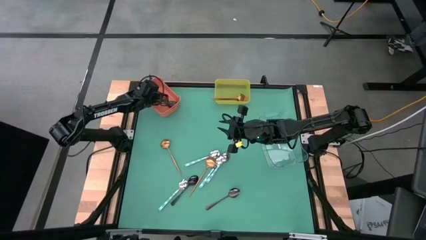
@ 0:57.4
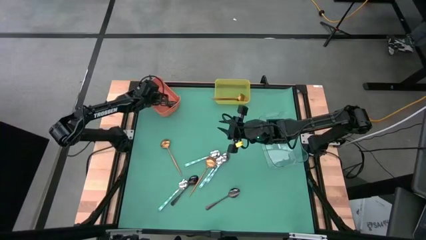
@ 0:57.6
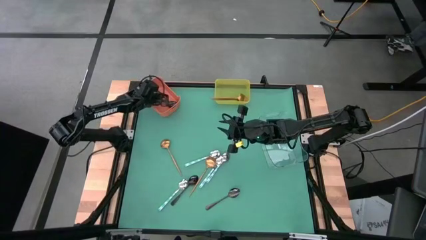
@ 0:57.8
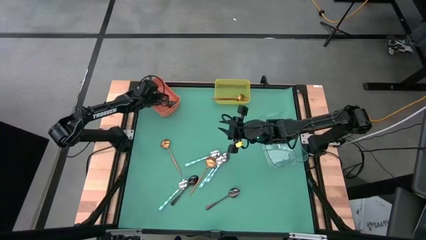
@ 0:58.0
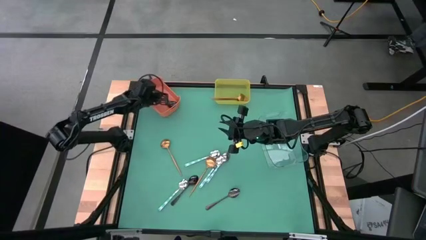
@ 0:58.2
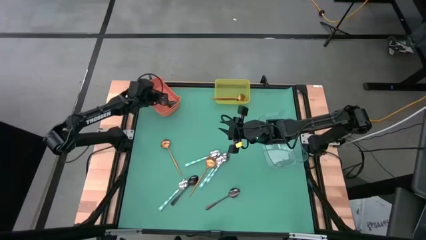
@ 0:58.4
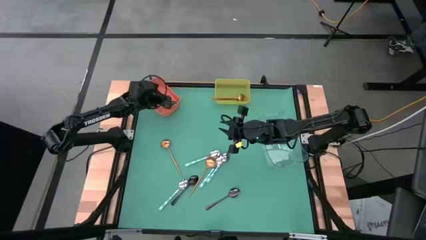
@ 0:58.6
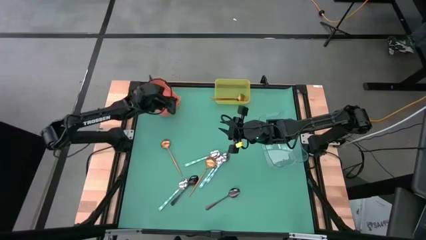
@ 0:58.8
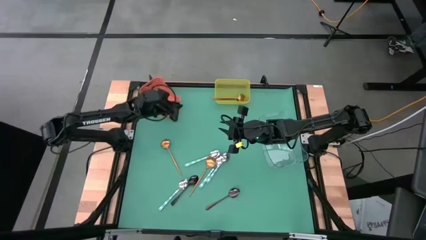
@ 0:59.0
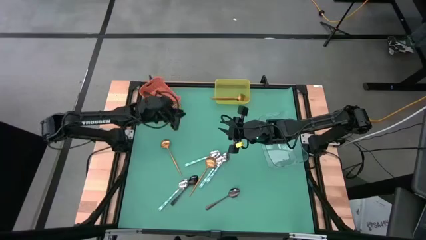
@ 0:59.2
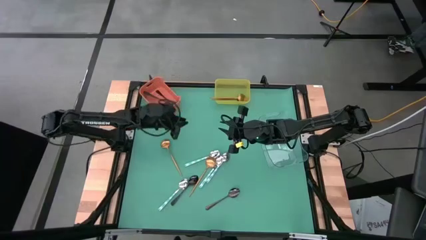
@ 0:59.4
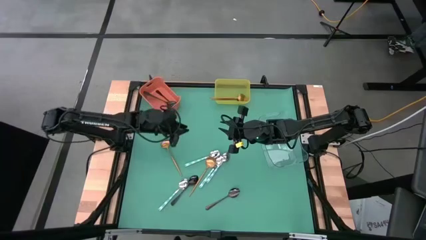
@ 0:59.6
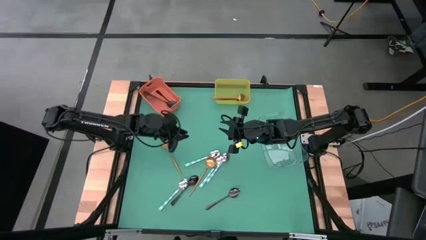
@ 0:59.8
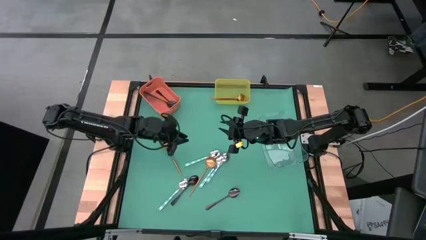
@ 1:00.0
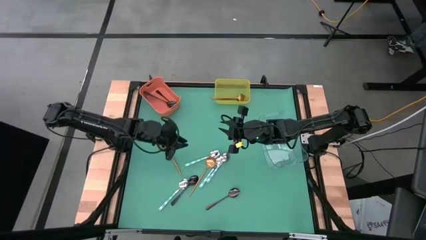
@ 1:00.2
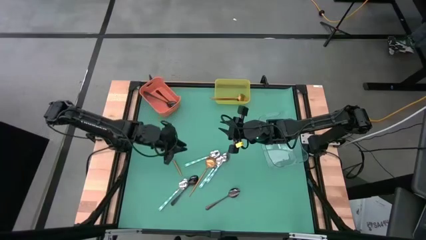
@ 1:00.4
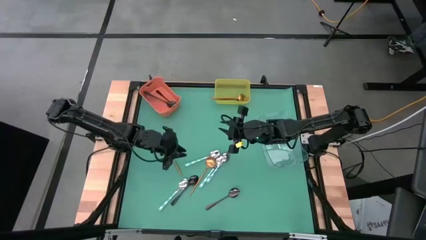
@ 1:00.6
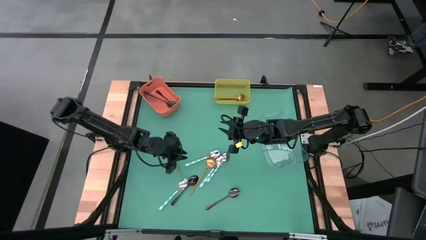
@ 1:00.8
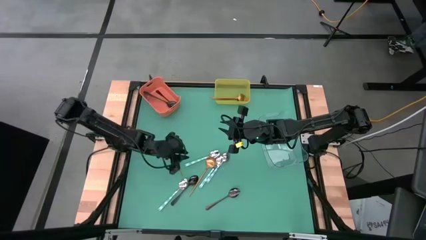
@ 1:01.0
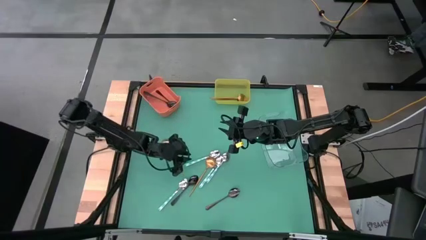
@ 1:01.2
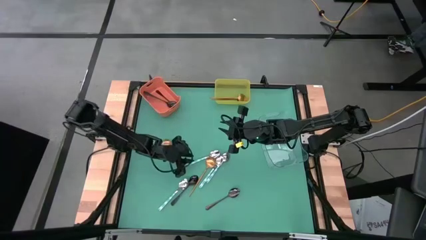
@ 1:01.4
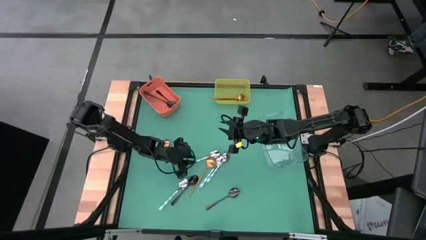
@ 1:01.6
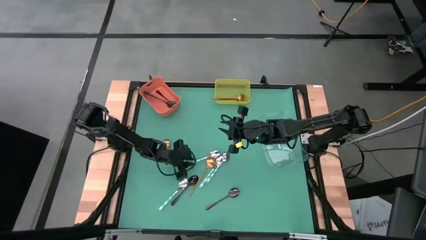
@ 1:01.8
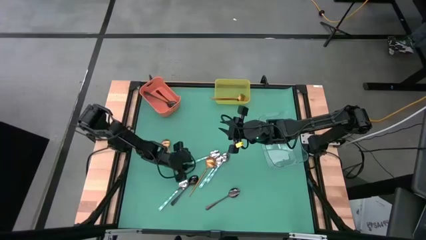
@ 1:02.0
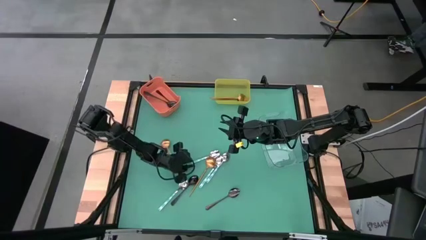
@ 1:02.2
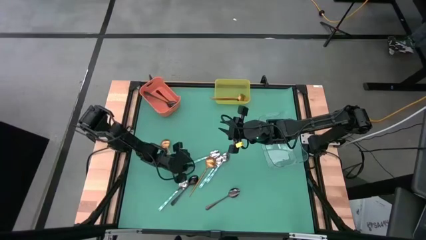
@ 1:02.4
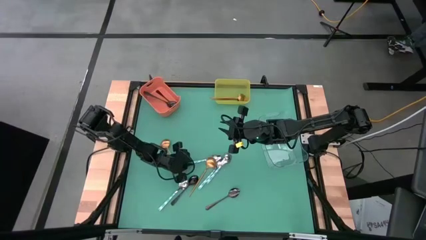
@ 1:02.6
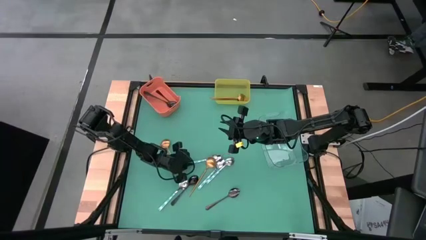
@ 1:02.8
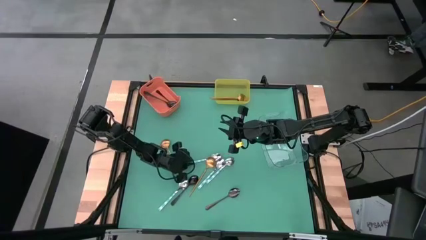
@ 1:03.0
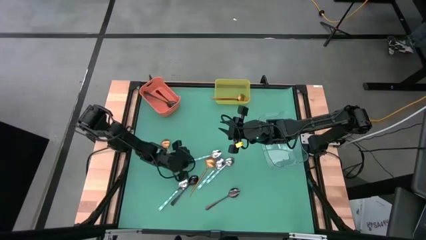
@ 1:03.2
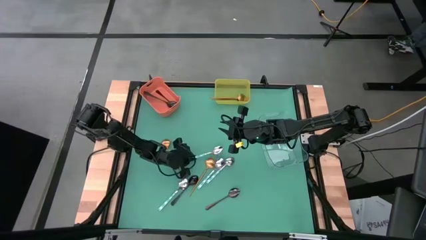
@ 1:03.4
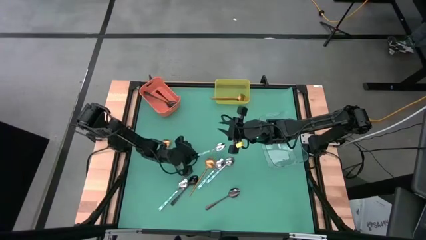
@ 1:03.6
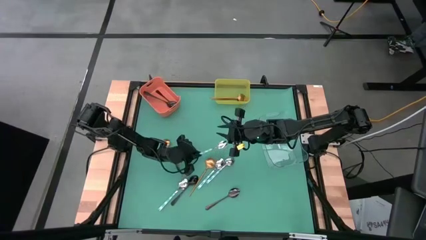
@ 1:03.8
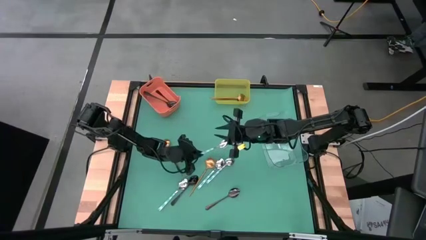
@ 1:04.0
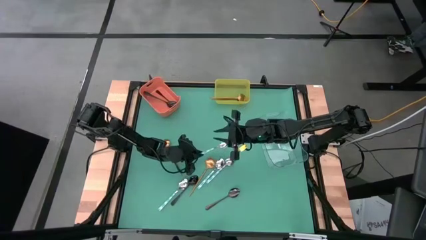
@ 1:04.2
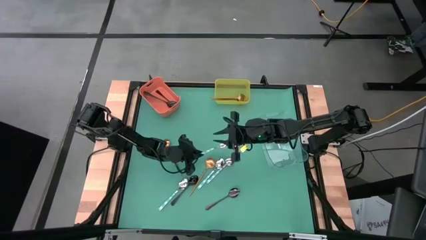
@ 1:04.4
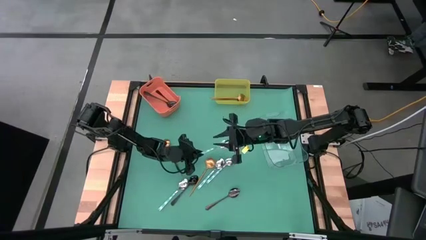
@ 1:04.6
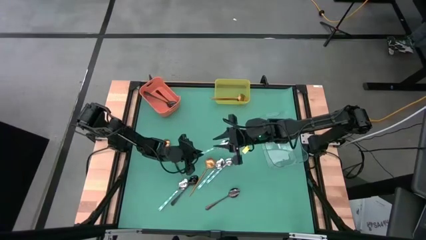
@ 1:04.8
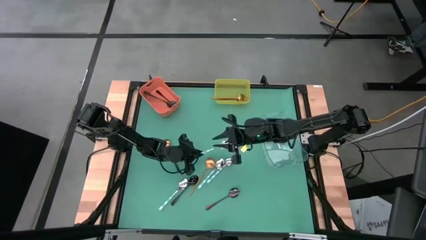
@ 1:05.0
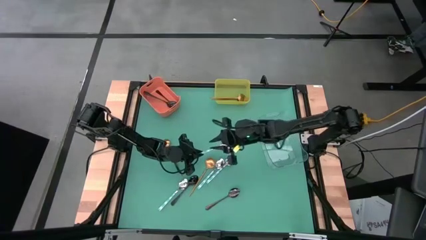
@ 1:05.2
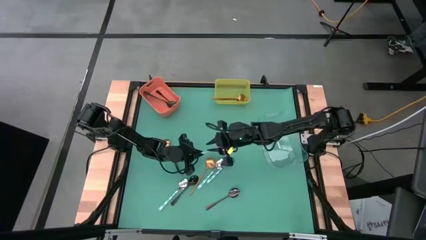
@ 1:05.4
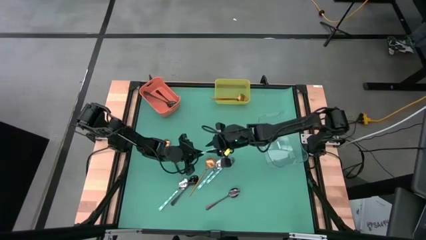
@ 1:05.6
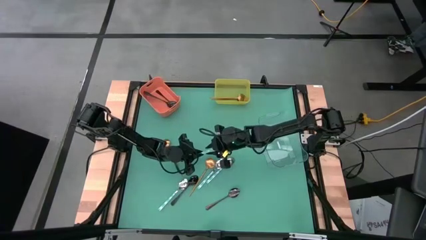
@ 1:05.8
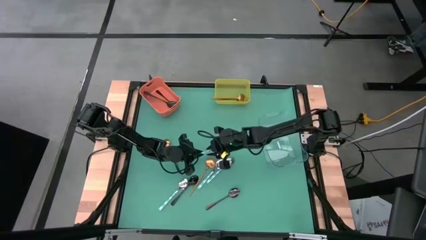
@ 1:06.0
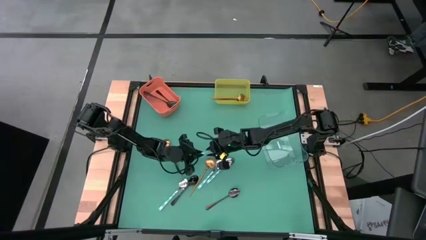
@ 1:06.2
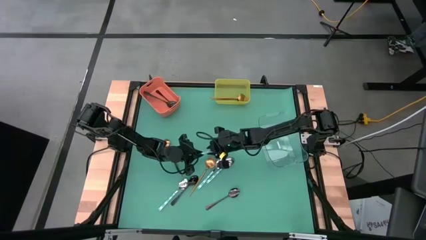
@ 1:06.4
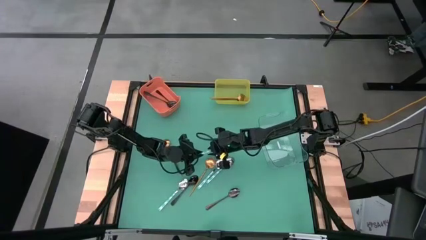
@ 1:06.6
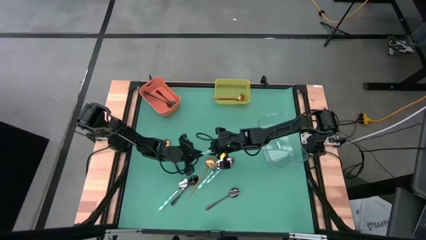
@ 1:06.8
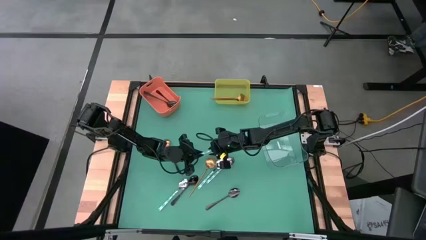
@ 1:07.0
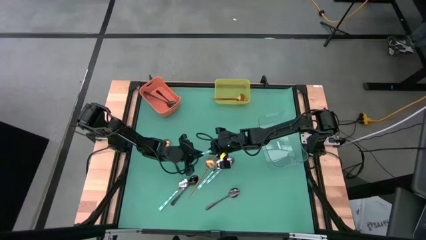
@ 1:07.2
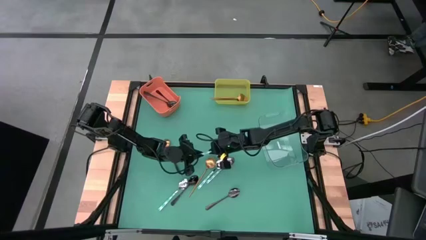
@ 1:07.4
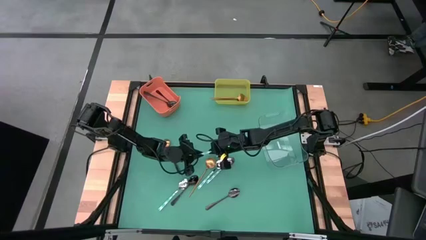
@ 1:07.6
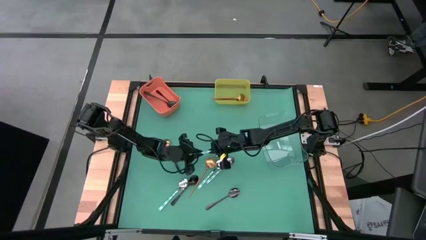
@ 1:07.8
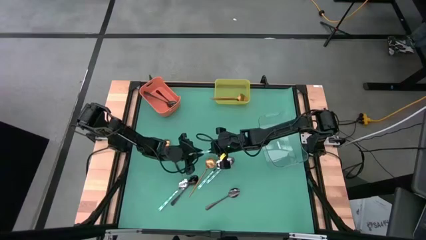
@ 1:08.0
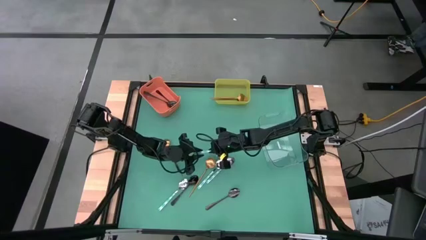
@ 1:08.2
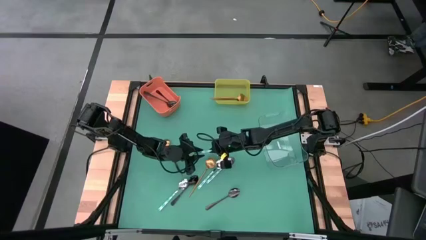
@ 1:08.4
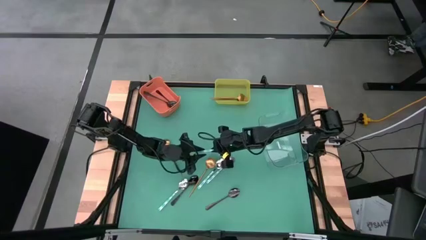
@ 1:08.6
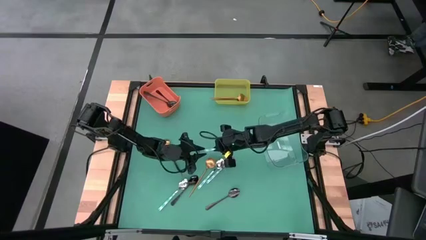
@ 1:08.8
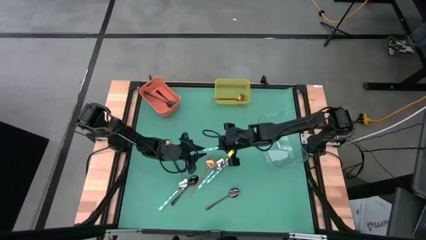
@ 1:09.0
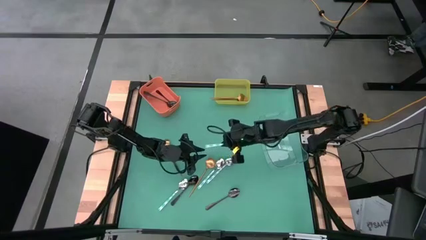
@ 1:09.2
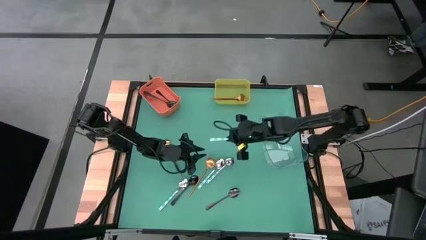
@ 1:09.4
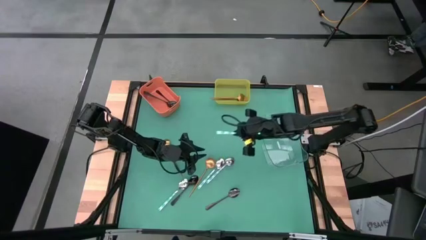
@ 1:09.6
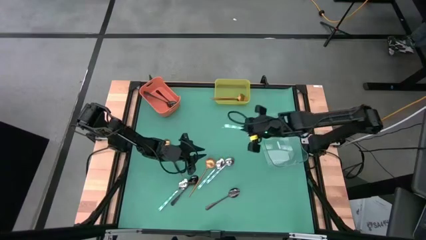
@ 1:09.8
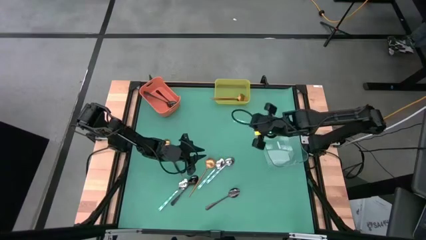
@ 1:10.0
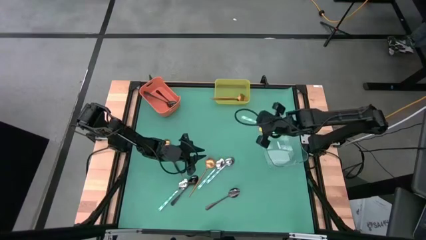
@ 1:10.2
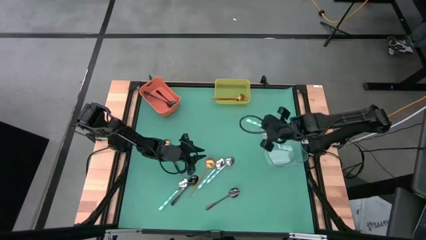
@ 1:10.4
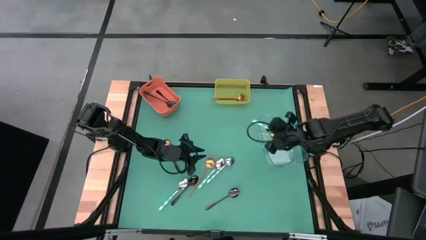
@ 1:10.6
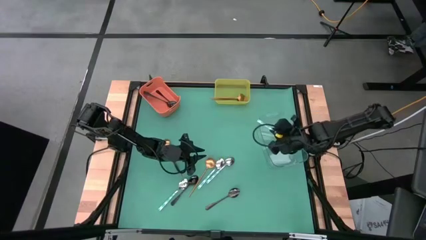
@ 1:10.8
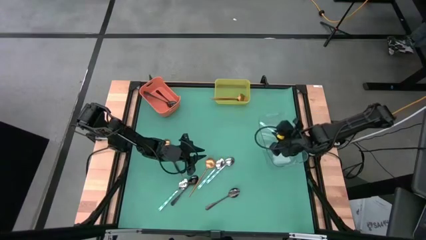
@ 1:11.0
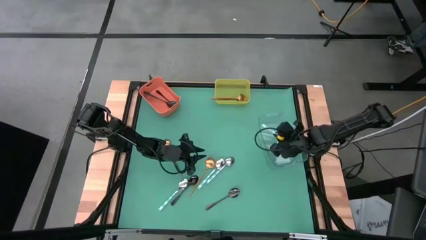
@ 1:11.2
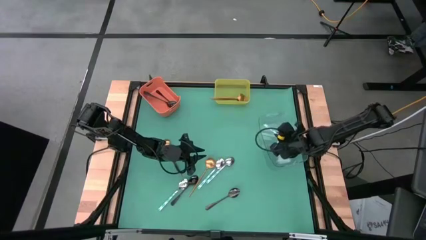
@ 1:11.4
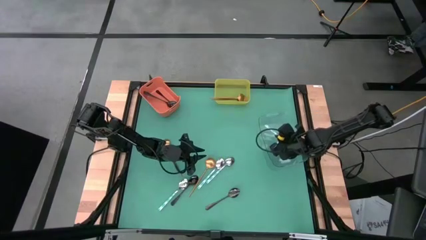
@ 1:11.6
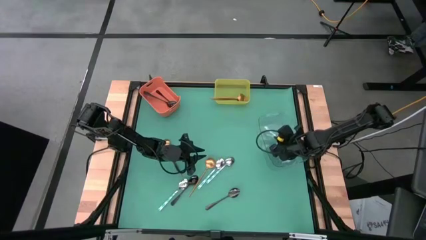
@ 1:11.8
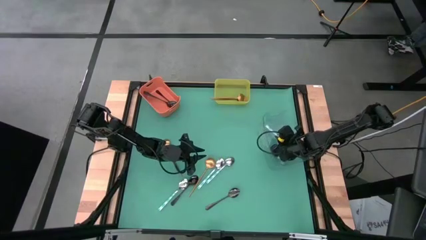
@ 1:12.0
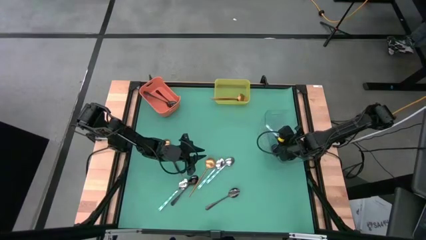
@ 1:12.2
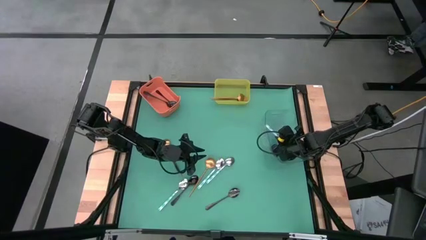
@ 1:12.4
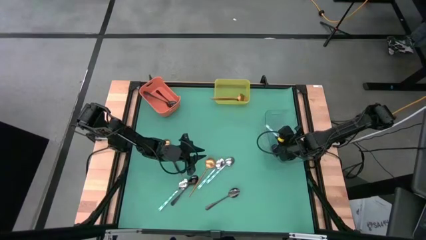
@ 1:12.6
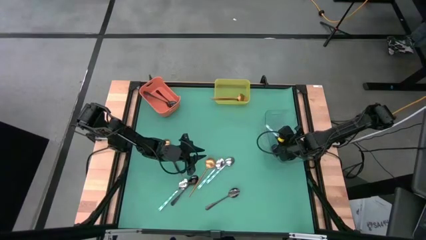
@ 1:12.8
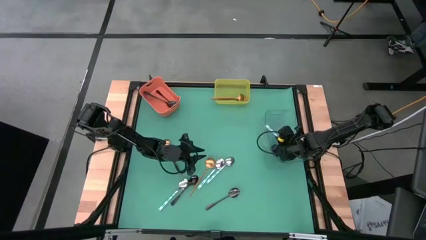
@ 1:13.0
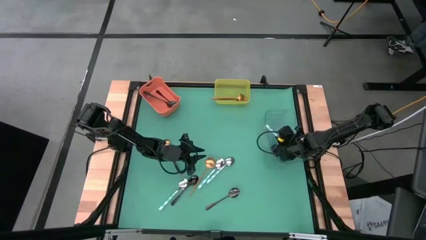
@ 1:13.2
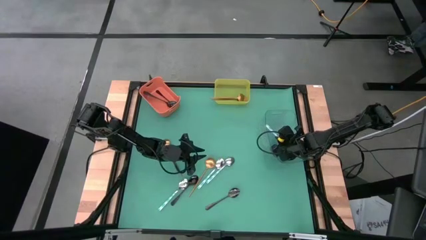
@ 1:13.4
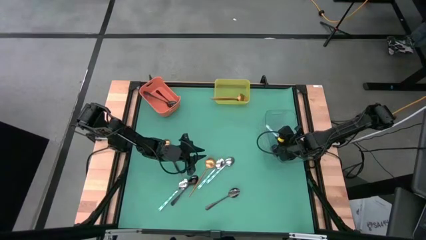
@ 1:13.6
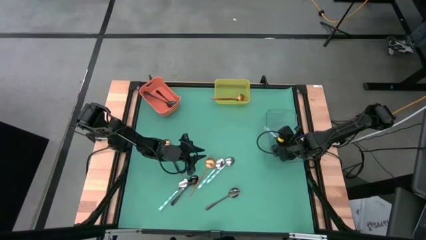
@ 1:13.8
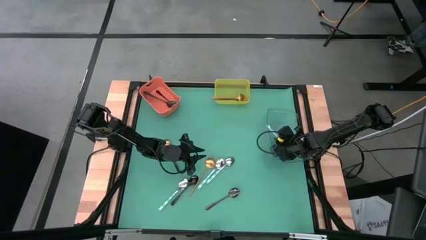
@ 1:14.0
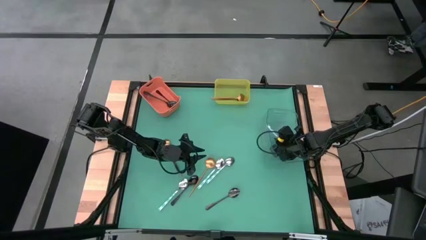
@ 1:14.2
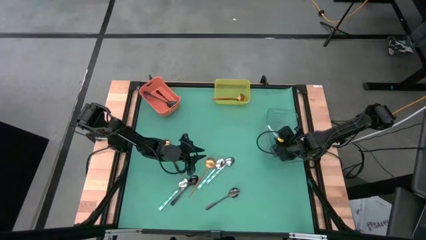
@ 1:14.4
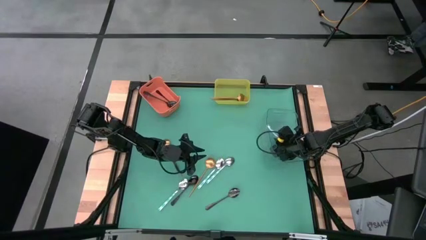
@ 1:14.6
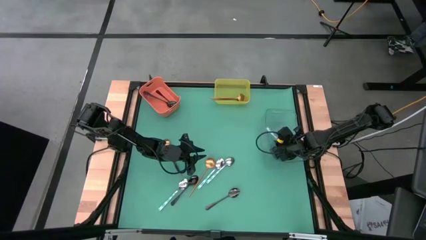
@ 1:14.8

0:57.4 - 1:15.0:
Task: Sort silverware by color (type)
Put the white patterned spoon into the transparent bin
